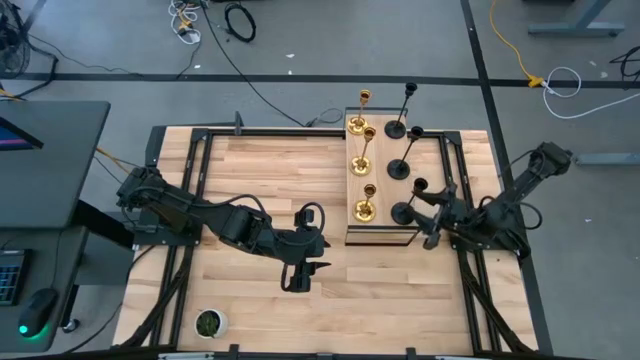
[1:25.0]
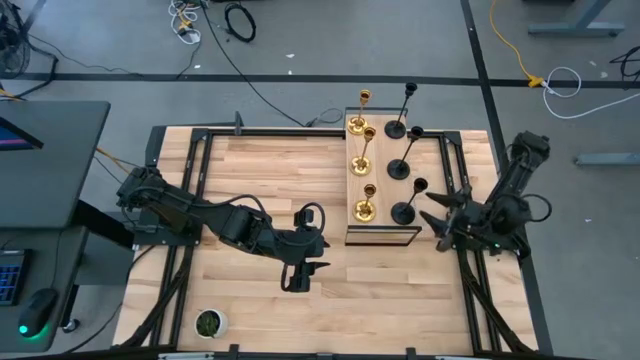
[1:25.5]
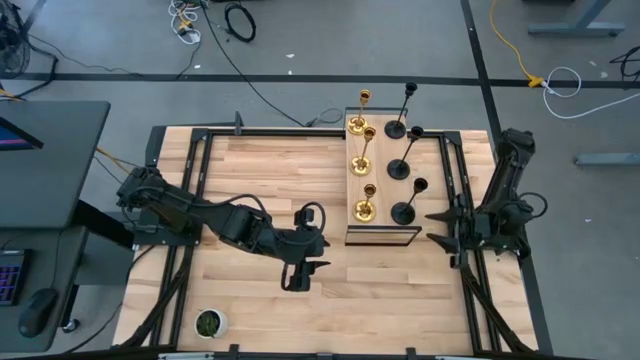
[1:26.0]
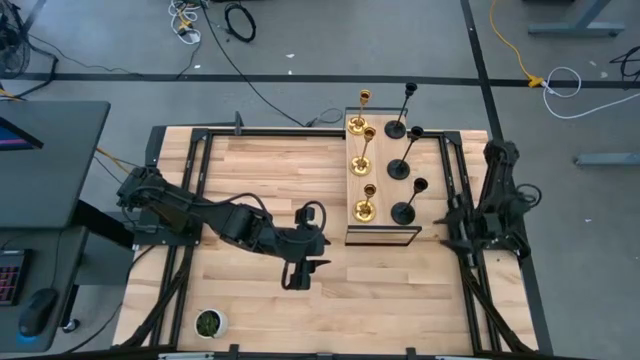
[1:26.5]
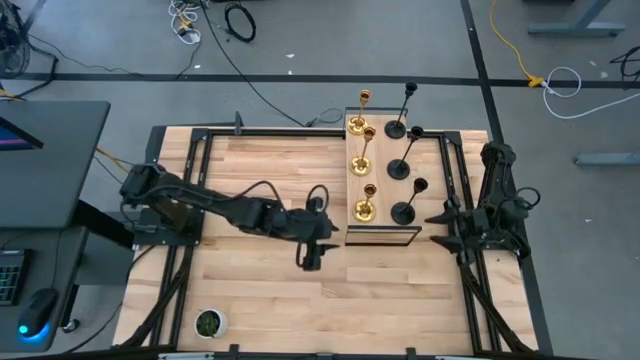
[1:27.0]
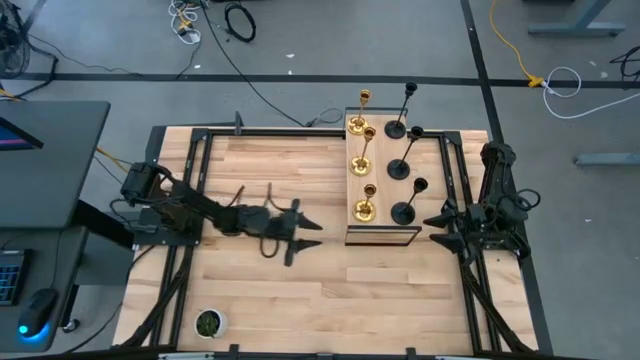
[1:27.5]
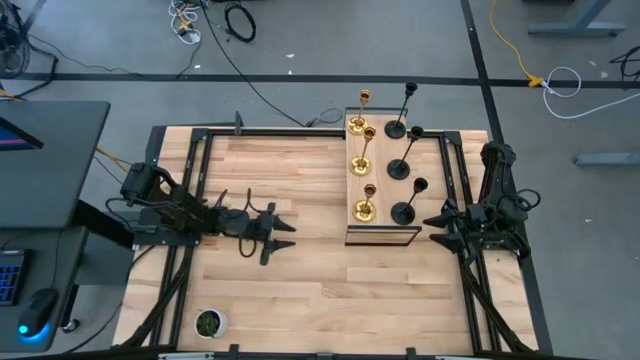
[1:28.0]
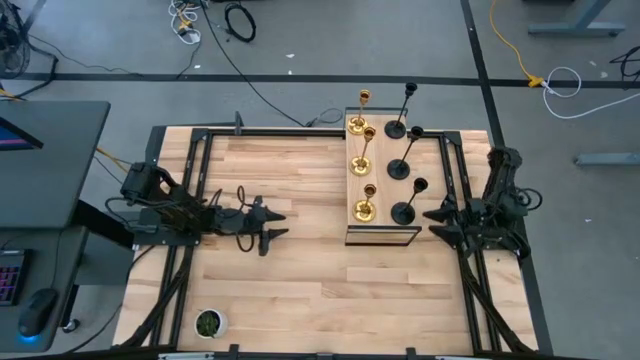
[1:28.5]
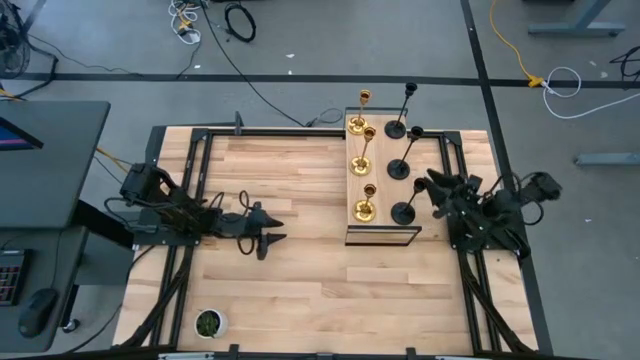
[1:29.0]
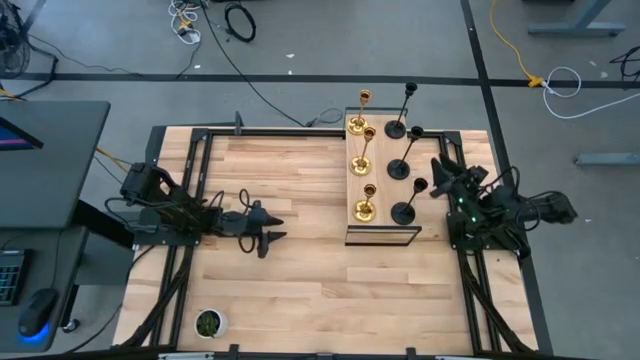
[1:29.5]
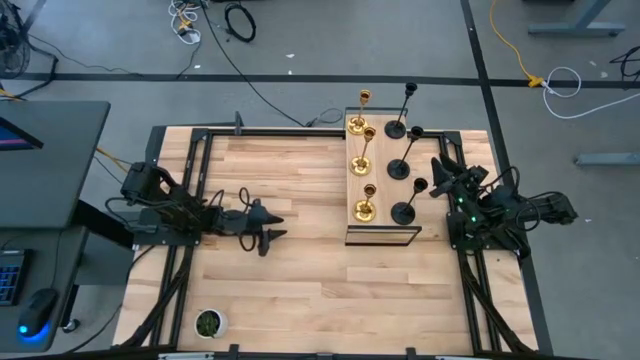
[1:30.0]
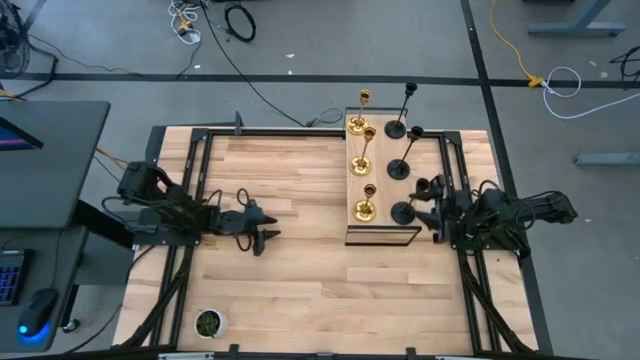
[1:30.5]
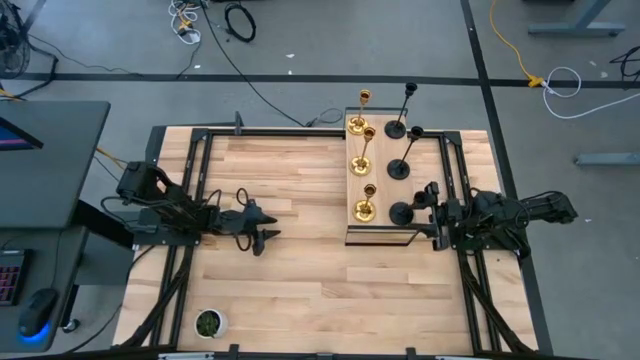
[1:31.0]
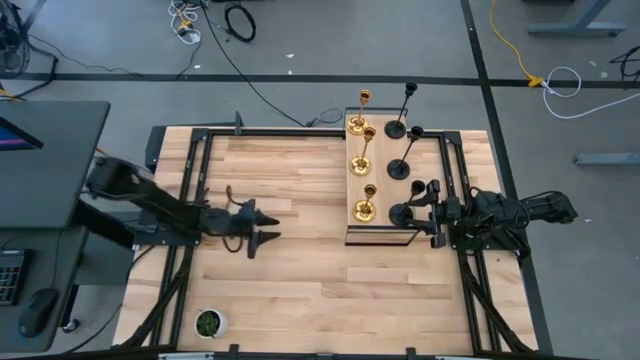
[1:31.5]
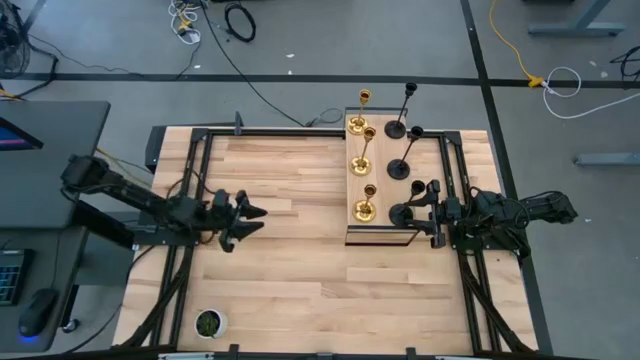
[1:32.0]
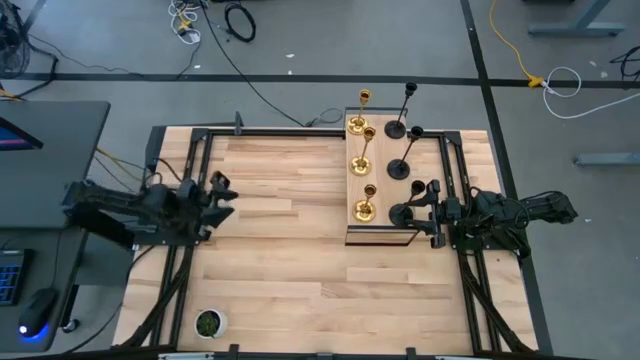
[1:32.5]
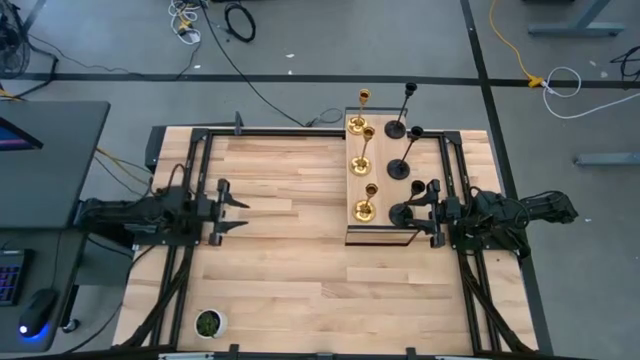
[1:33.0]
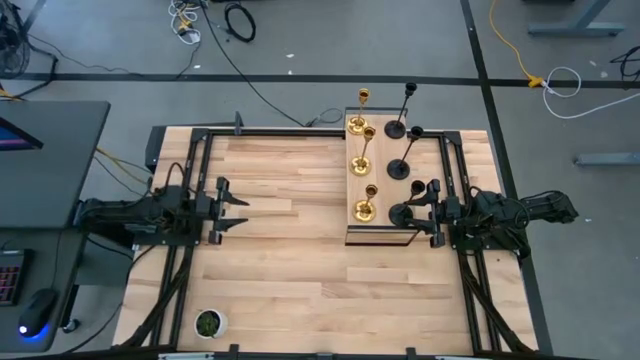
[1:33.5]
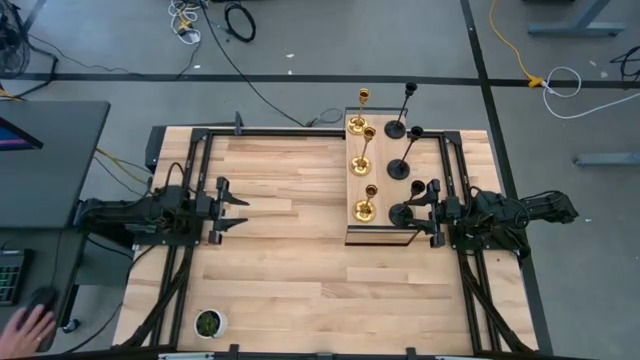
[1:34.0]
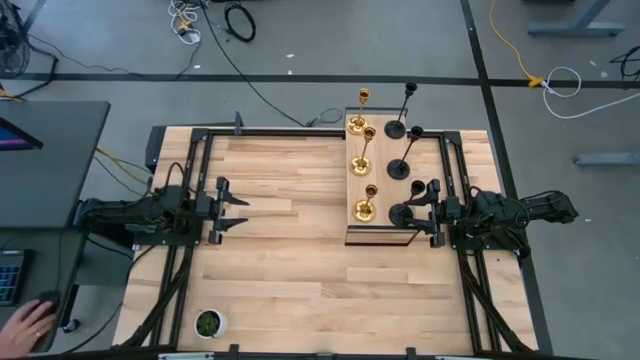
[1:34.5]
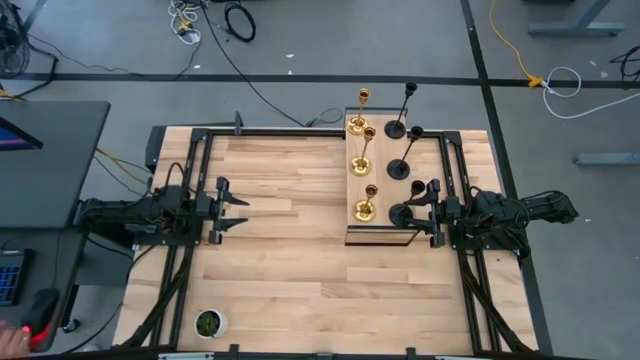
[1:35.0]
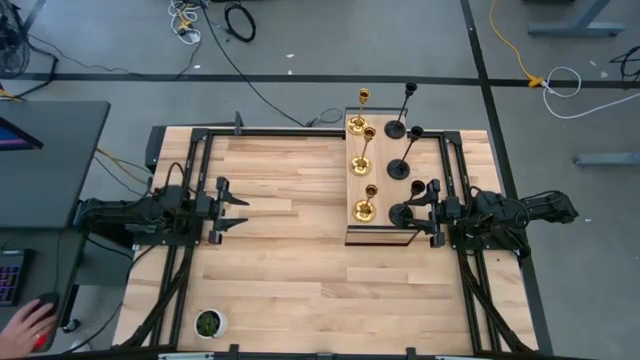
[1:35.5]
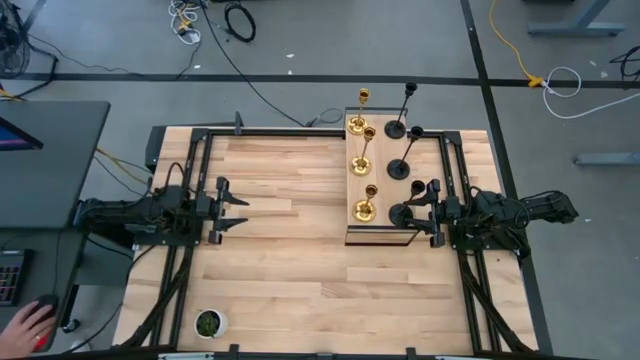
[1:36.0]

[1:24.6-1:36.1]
Task: Pick & Place candle stick holders
Return to Home Position

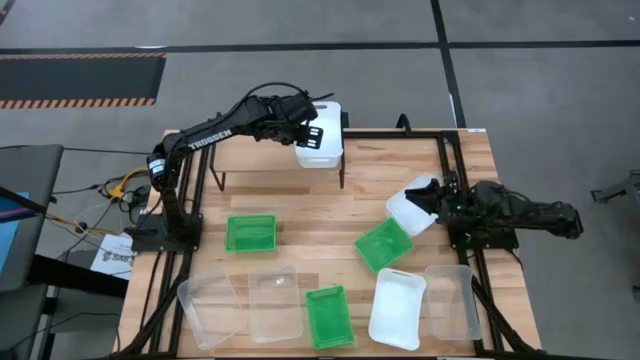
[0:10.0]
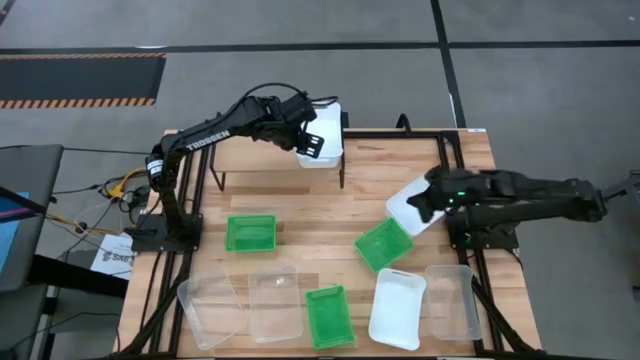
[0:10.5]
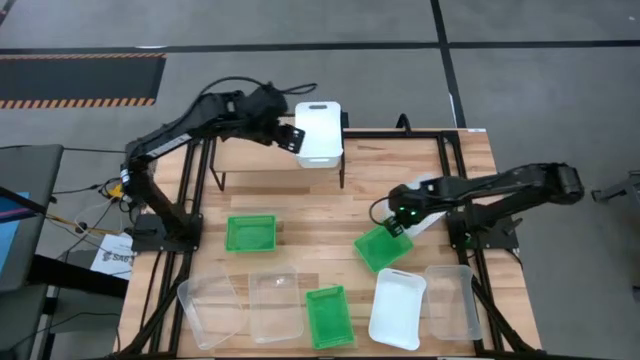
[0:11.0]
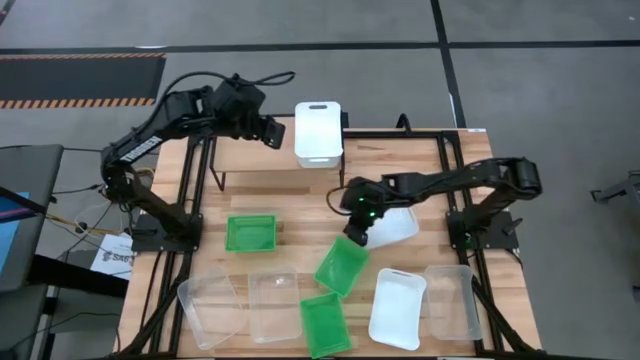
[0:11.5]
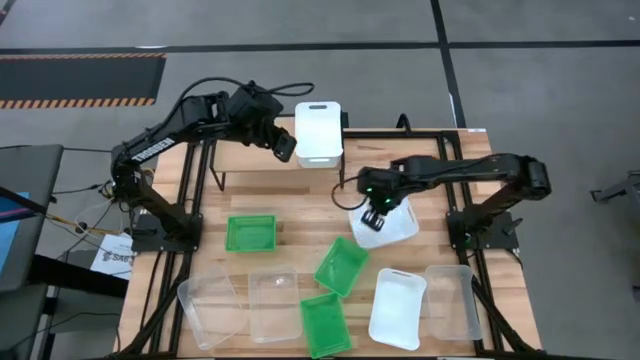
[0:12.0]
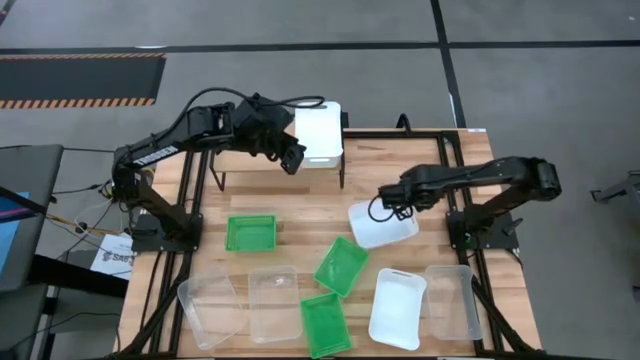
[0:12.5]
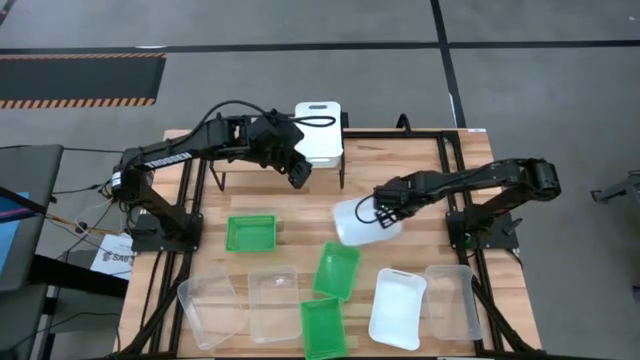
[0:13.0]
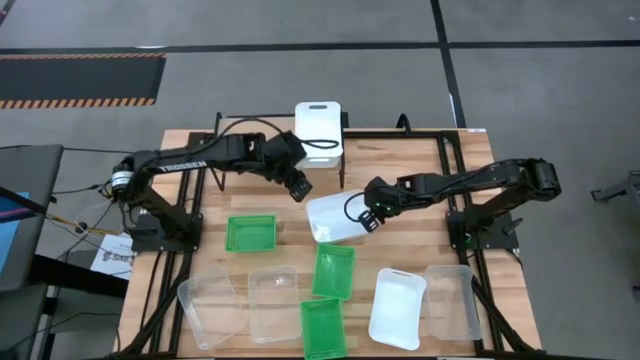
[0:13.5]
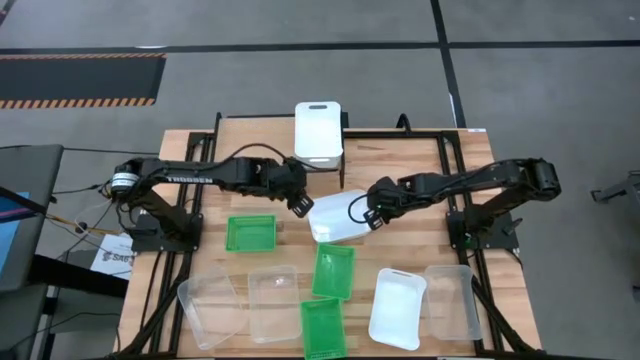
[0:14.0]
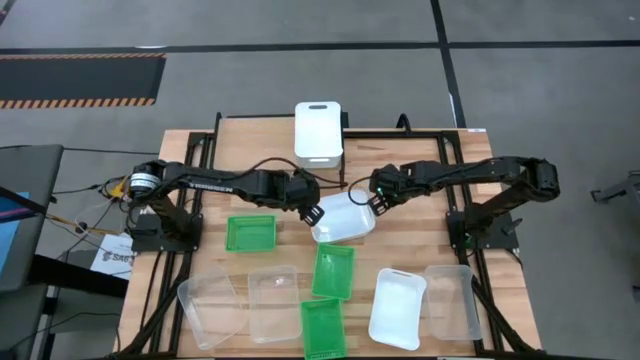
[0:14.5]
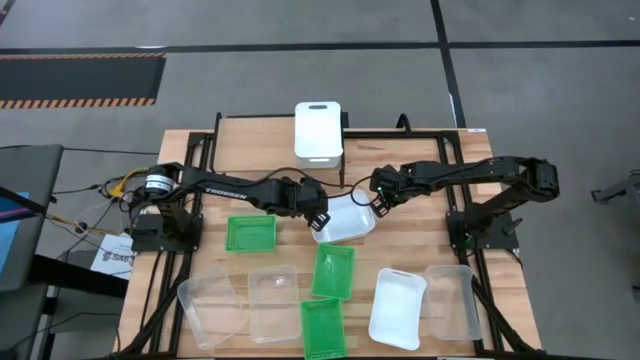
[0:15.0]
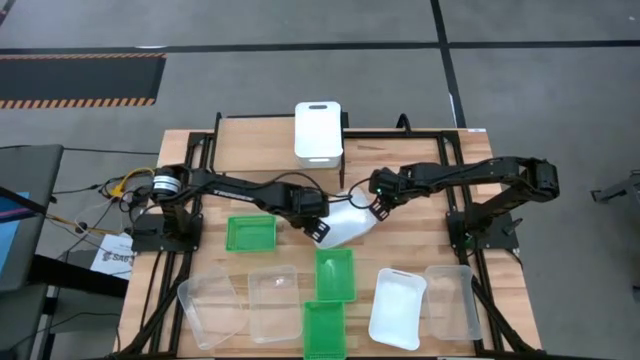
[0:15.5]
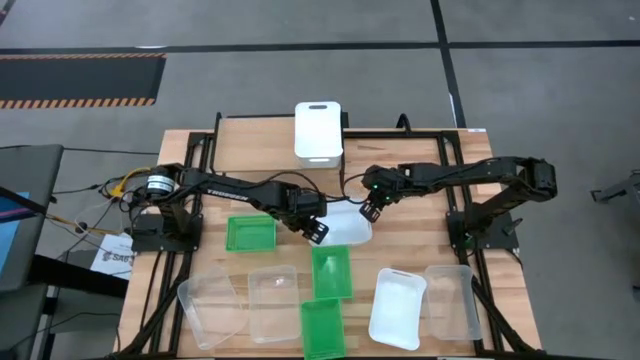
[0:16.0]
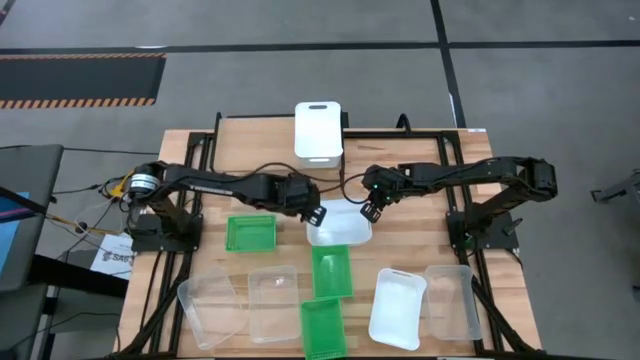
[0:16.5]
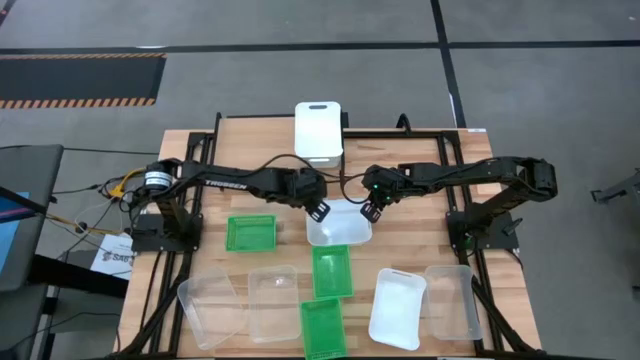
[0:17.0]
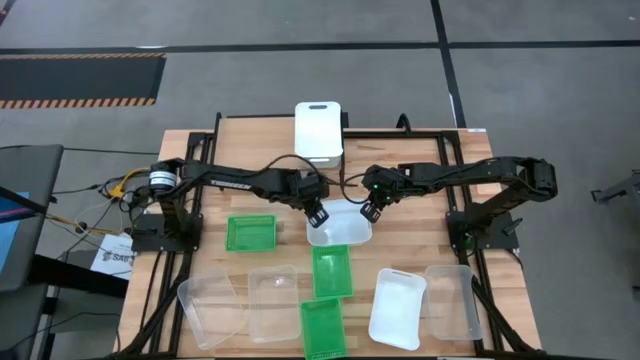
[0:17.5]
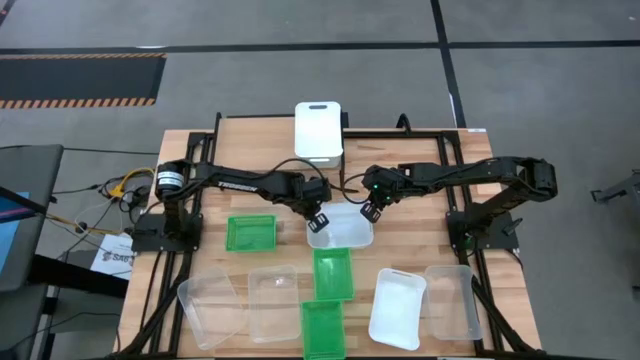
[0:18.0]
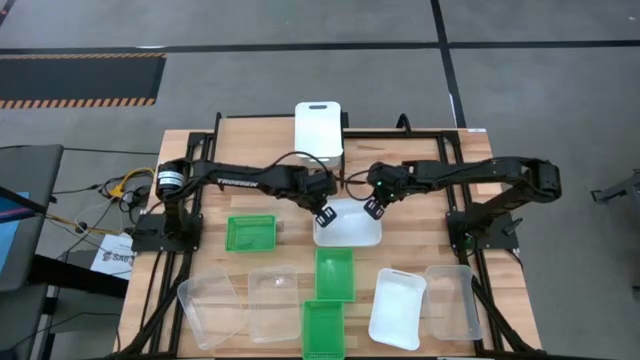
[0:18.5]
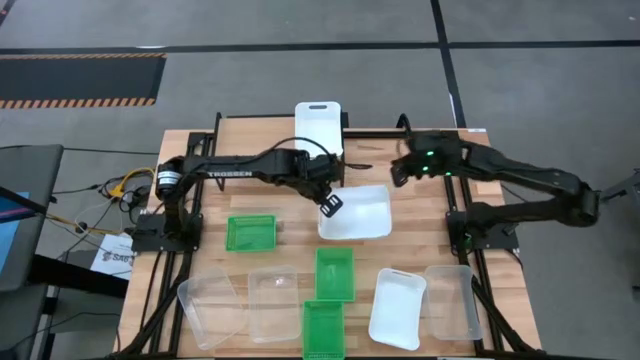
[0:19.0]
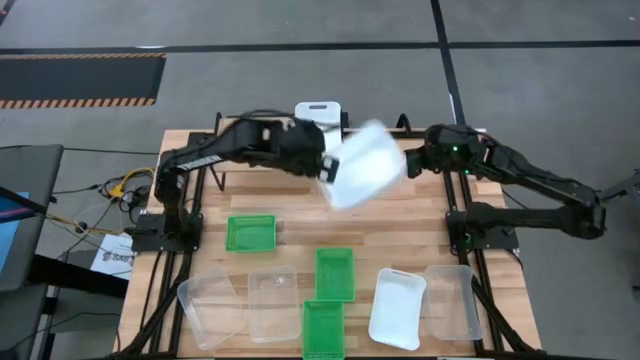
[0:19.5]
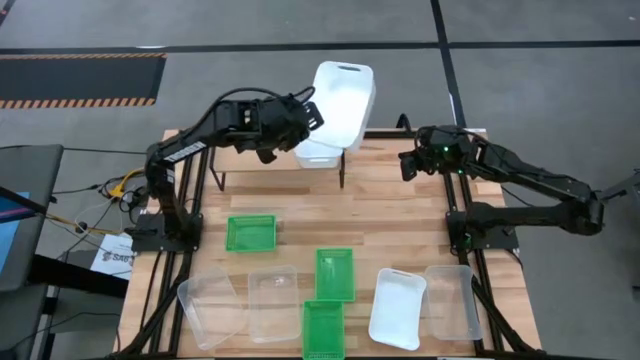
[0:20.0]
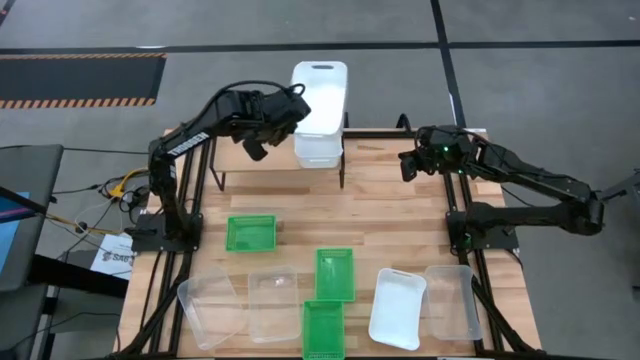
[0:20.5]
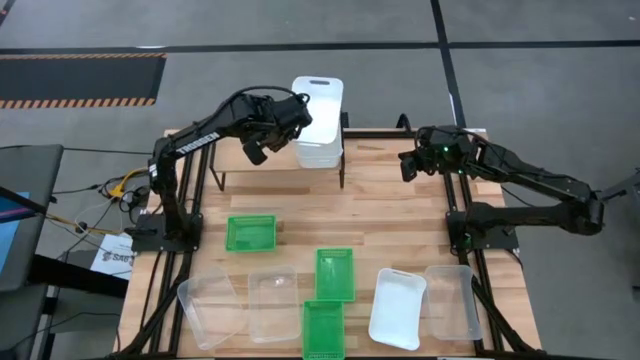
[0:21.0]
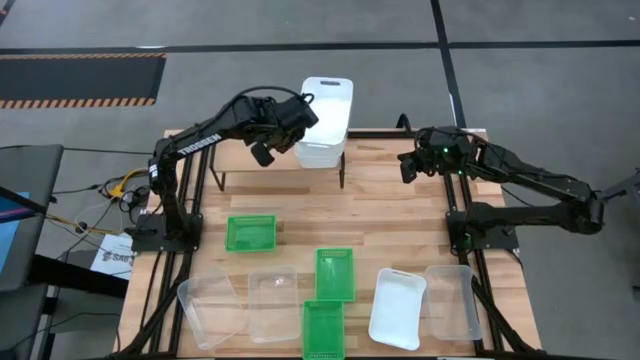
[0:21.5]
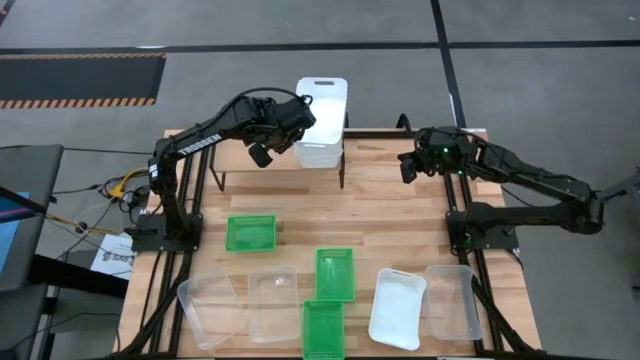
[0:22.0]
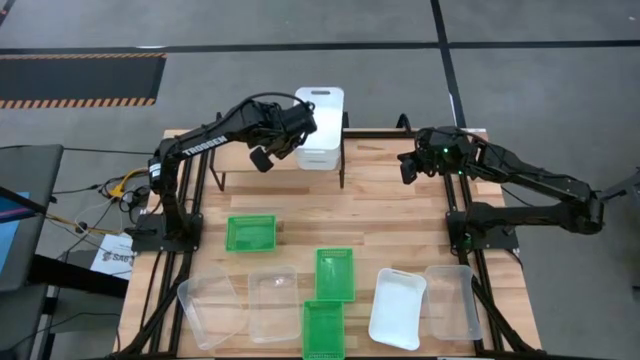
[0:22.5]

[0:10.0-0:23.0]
Task: Stack baskets on shelf by color
Stack the top white bin on top of the white bin on the shelf
